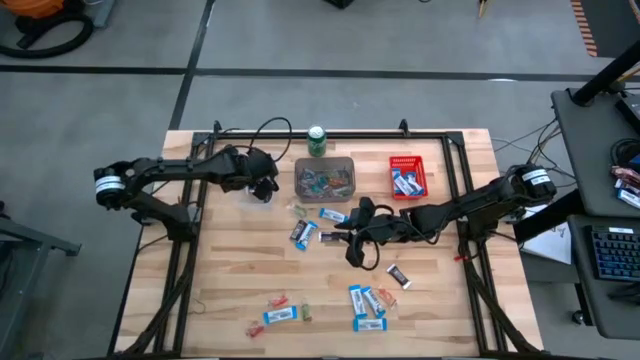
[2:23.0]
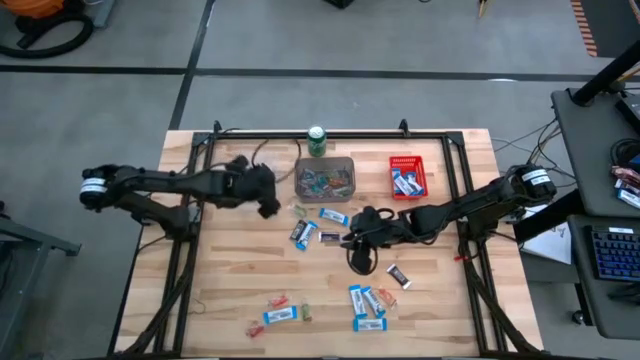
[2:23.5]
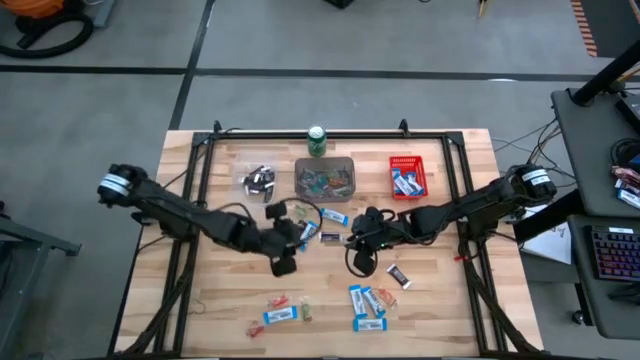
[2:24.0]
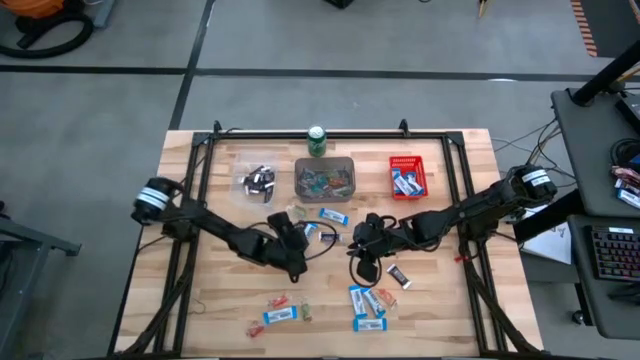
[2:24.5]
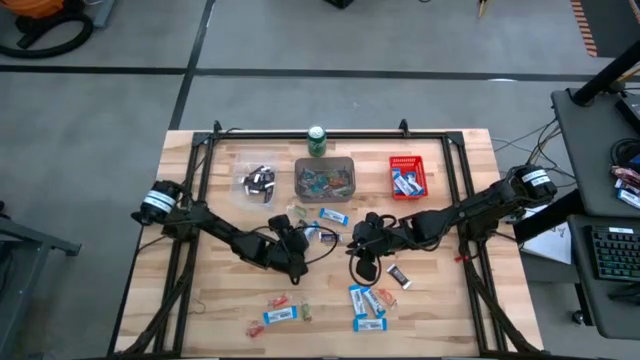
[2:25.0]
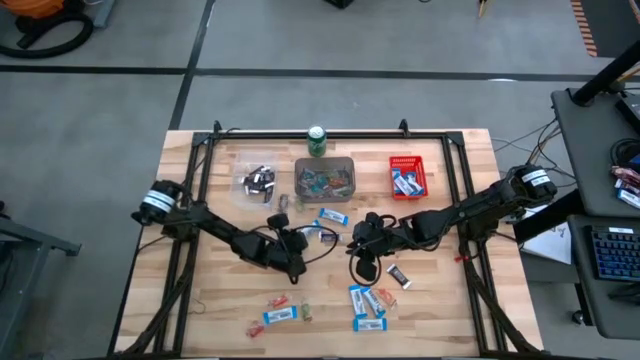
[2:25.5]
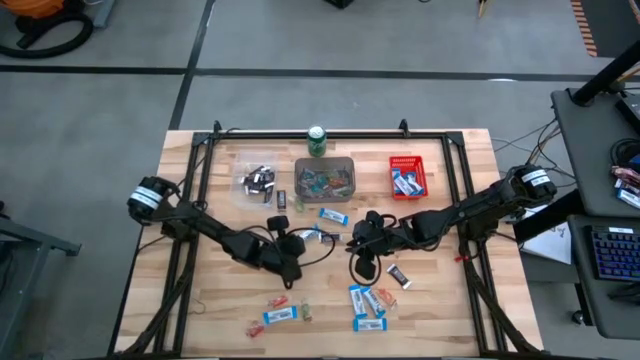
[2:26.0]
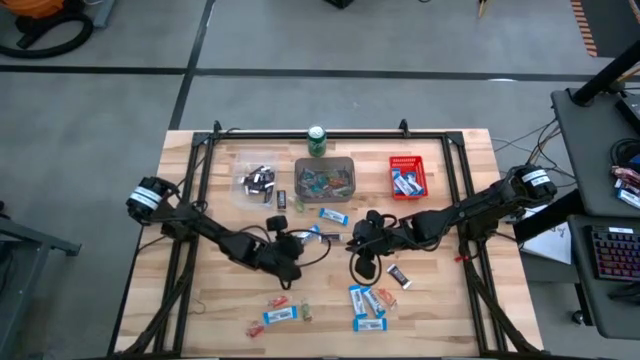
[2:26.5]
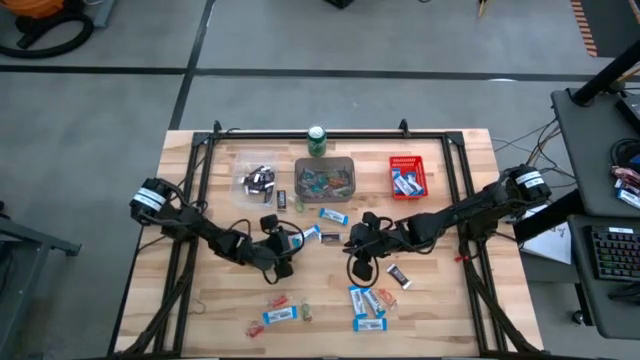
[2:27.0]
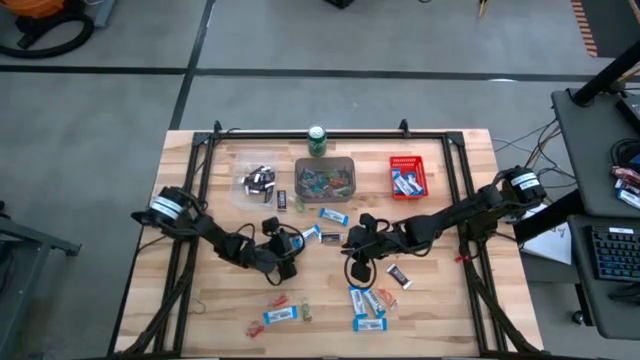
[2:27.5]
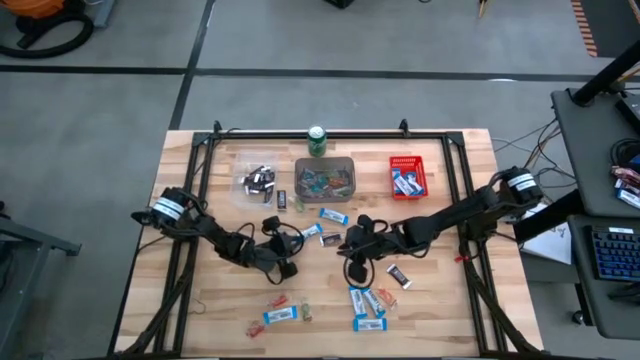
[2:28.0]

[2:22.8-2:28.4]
Task: Organize candy in baskets
Put the white chocolate bar into the red bin

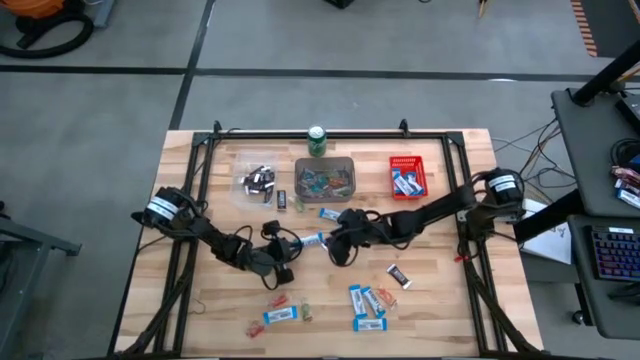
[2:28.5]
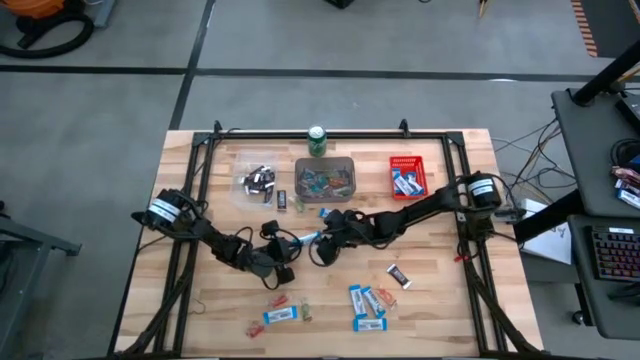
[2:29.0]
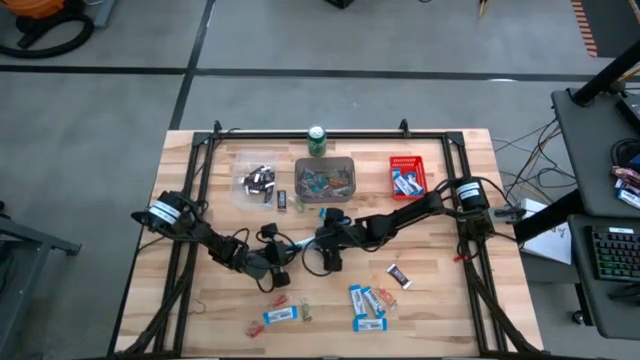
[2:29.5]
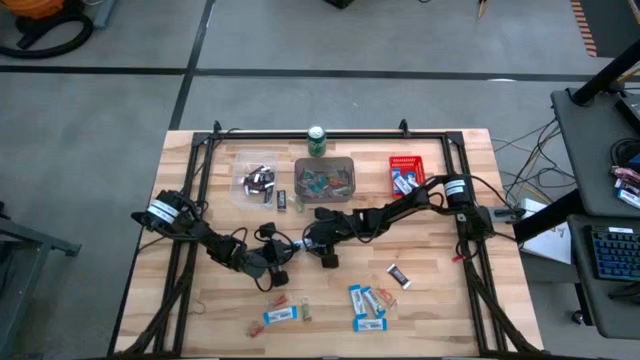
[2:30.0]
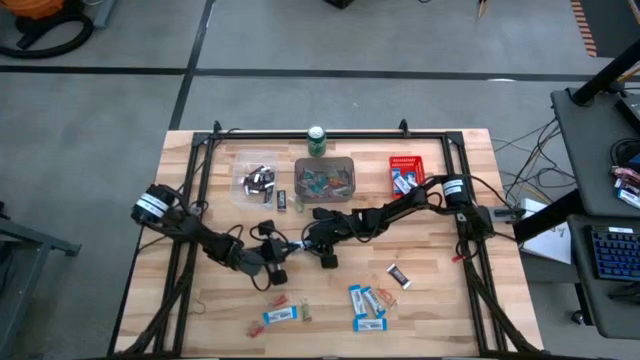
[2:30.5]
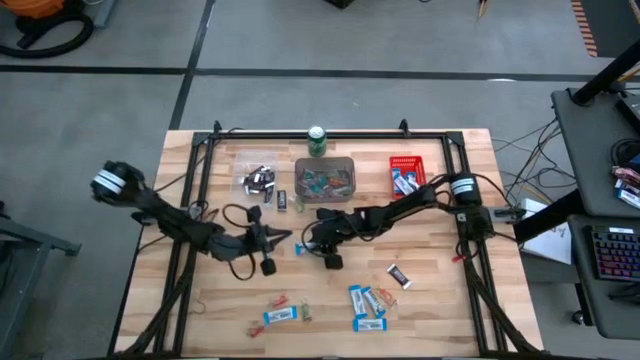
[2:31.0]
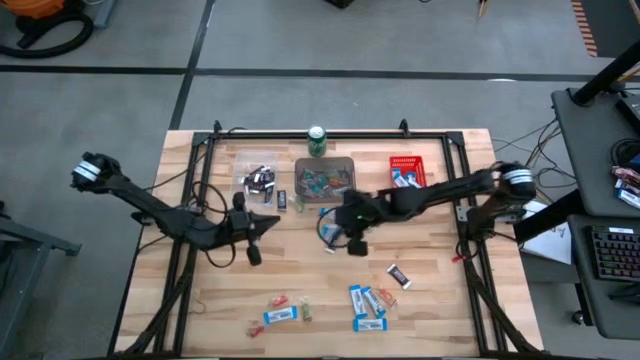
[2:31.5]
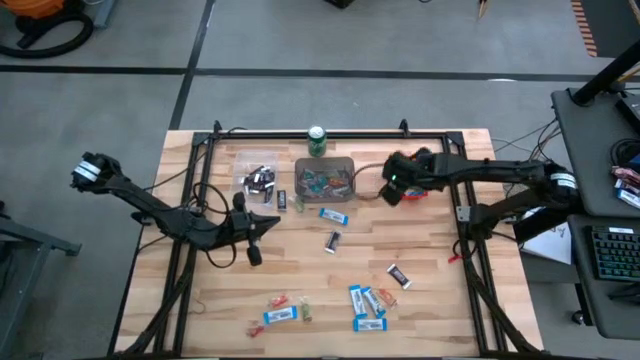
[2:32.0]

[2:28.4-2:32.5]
Put the white chocolate bar into the red bin

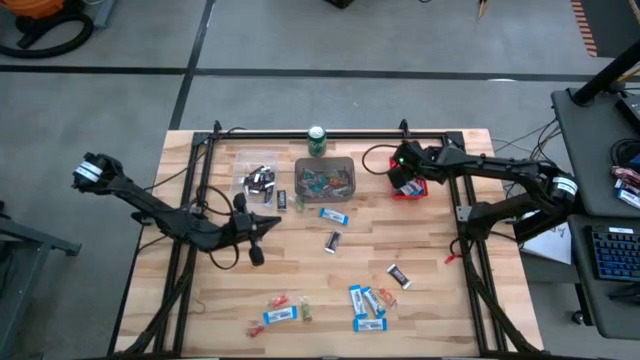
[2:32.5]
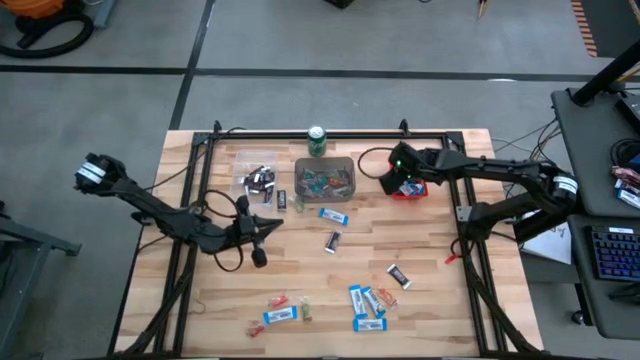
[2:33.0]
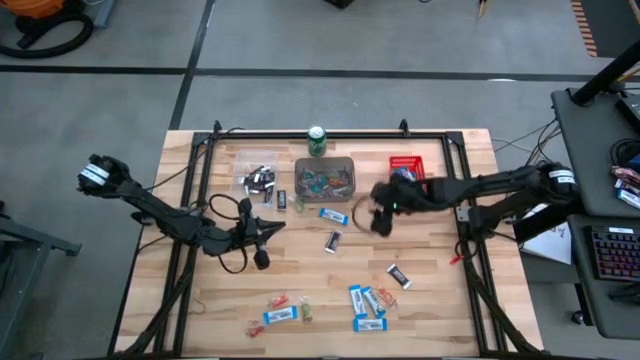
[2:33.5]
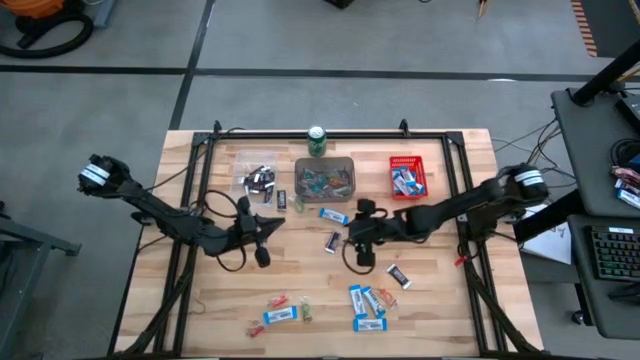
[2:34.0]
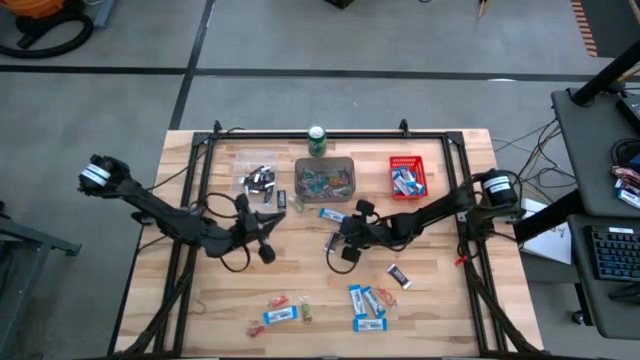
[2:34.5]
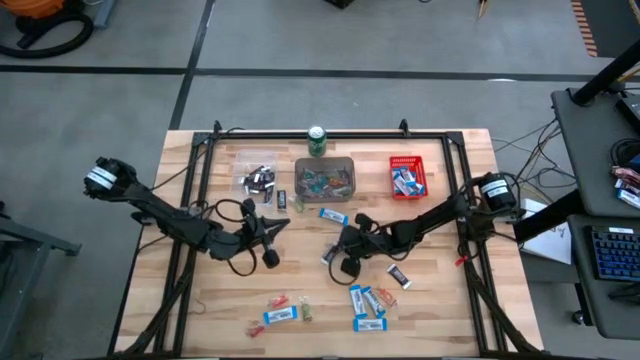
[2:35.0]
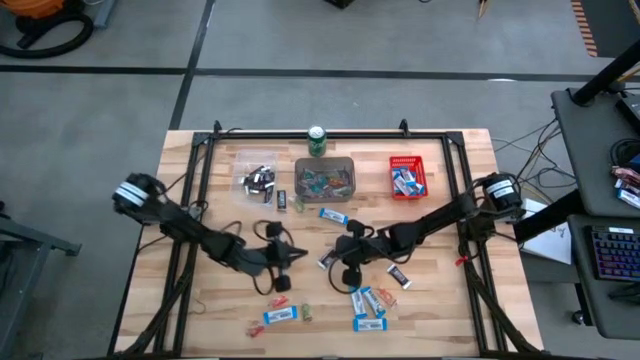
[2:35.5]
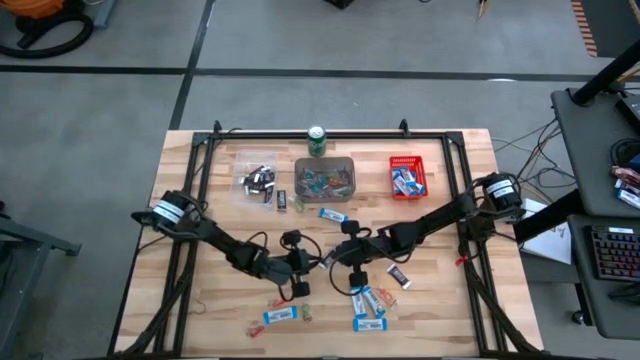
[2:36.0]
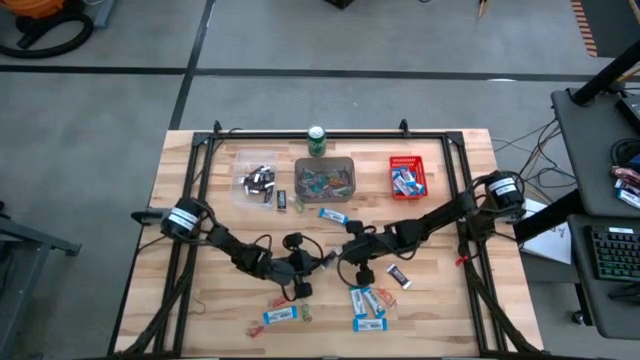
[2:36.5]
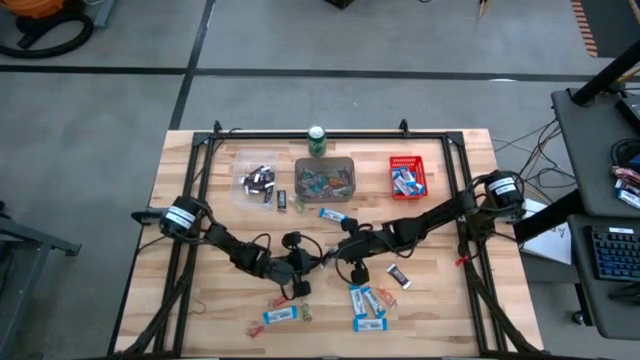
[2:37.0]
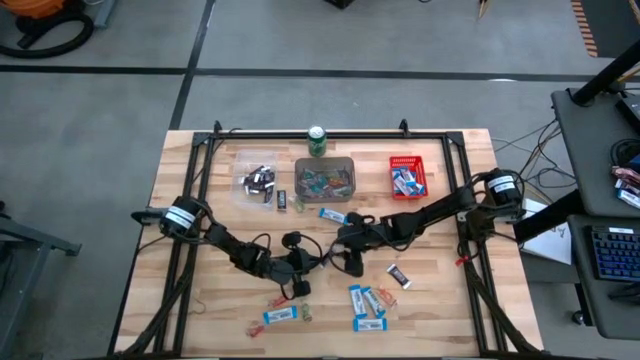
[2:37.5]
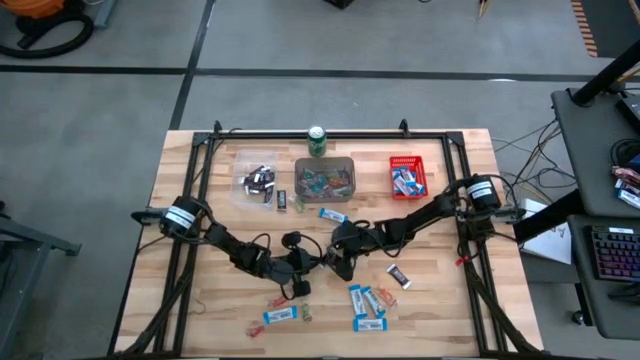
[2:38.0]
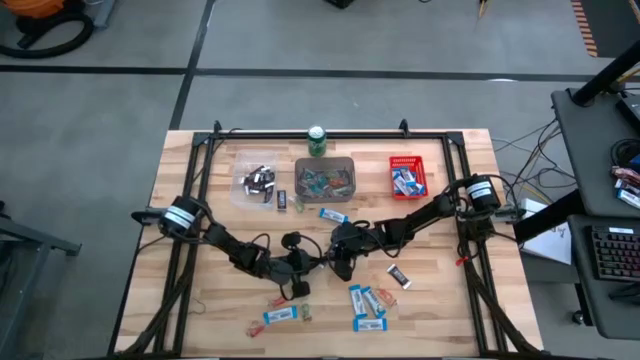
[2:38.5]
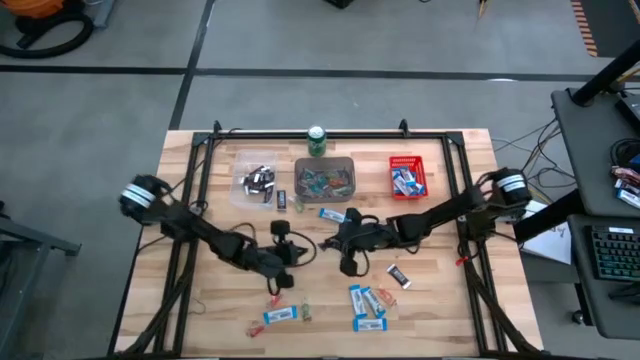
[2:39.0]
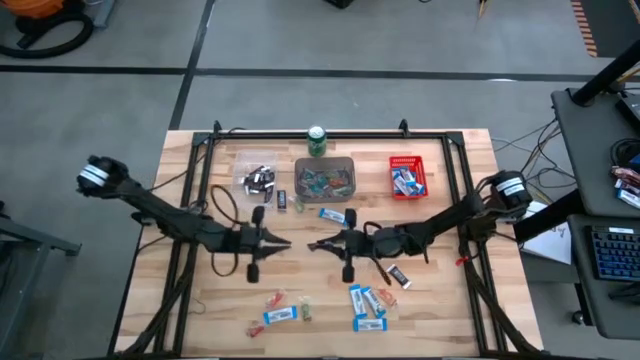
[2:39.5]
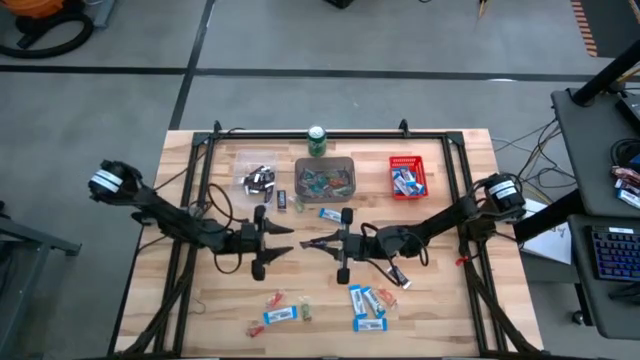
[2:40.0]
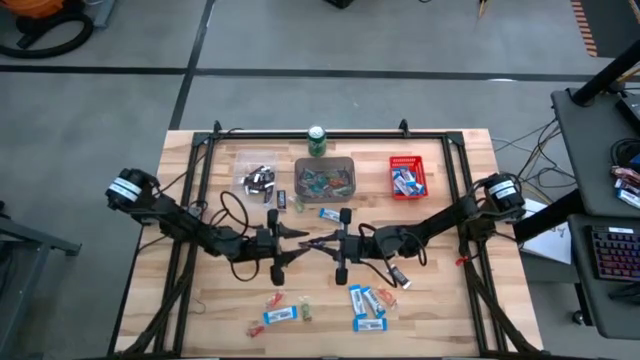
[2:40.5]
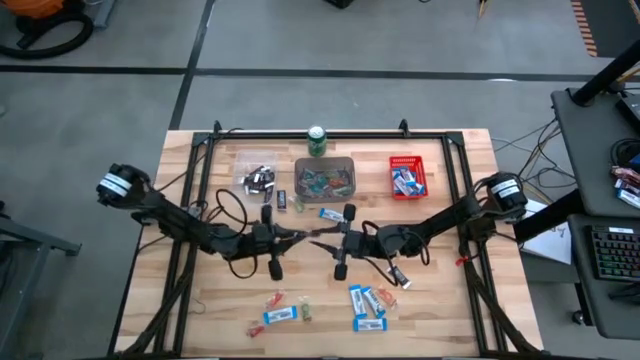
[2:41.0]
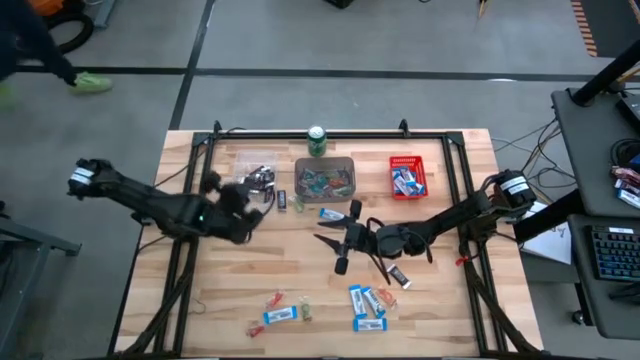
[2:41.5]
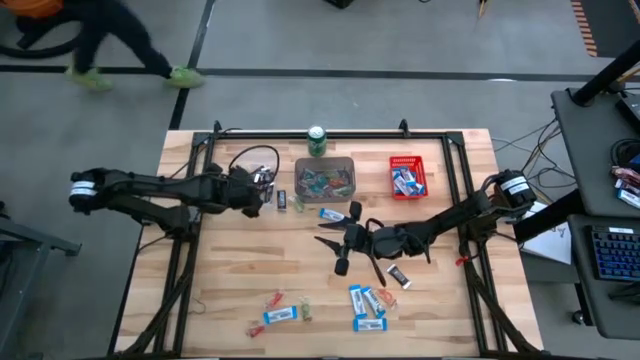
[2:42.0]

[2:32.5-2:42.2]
Put the brown chocolate bar into the transparent bin

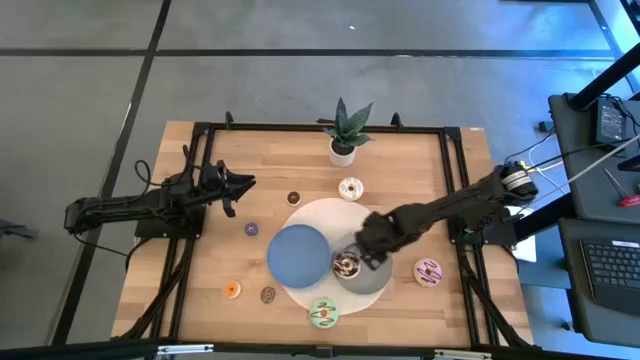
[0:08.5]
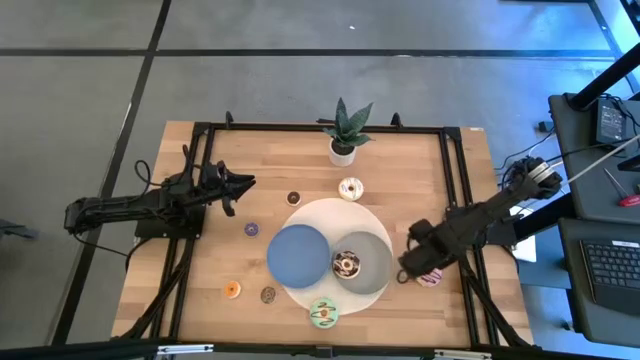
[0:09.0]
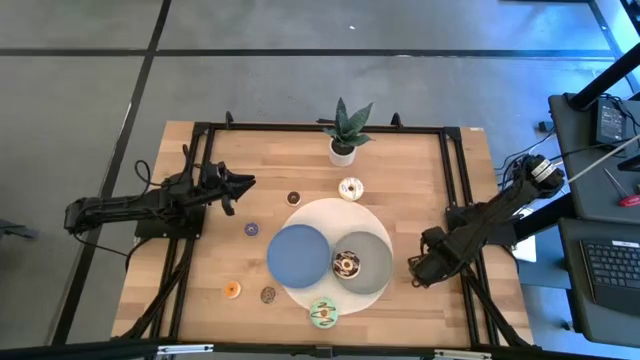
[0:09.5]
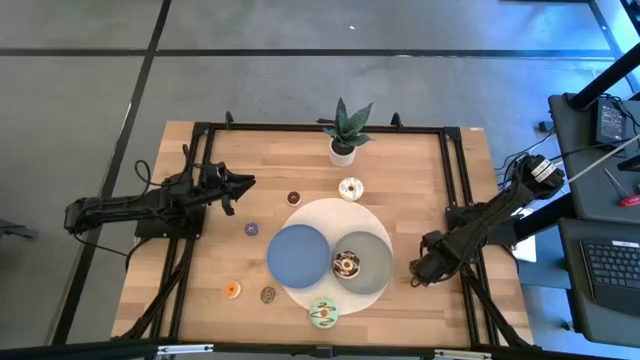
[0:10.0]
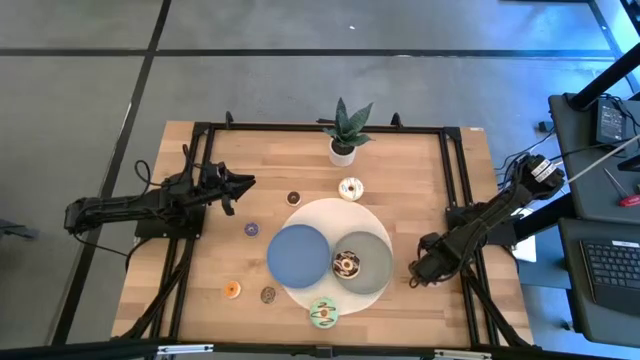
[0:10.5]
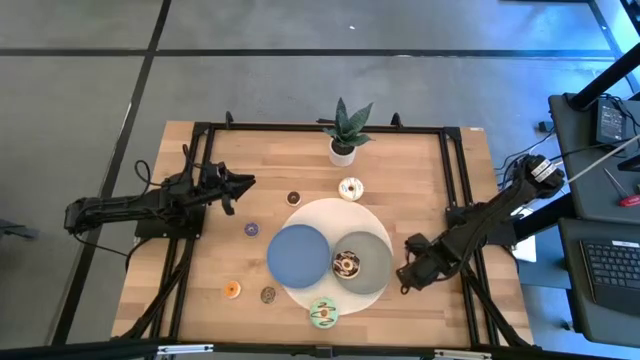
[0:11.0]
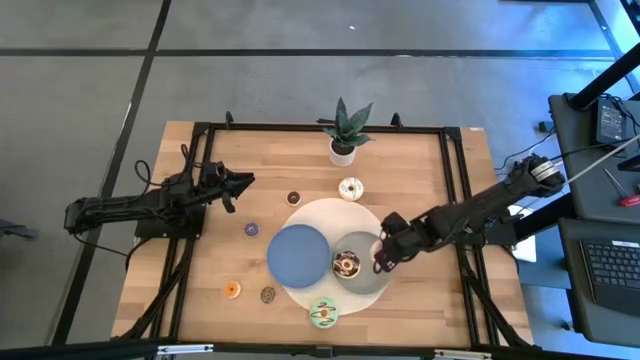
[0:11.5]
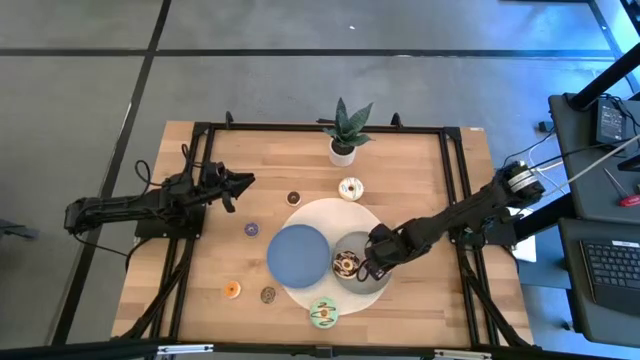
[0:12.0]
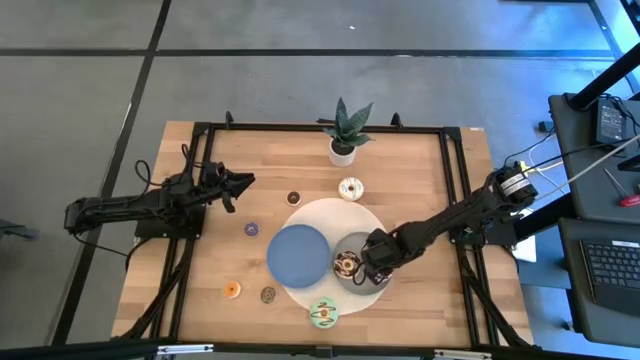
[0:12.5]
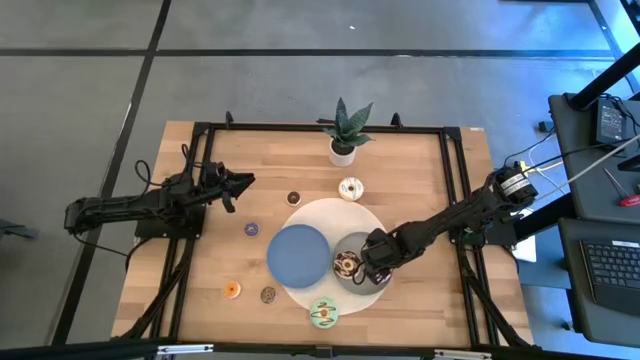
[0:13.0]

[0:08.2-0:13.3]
Task: Pick & Place donuts
Put the large purple donut on the gray plate
